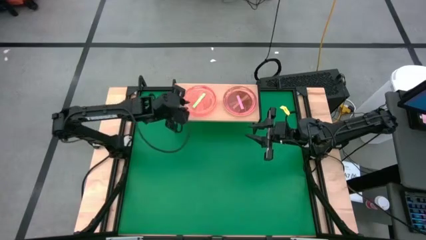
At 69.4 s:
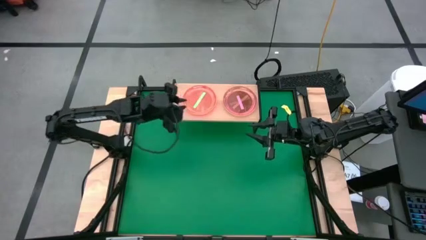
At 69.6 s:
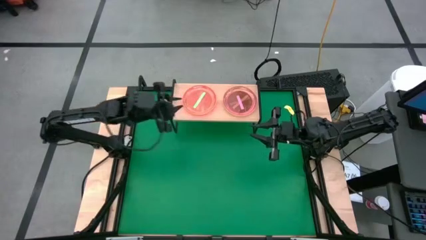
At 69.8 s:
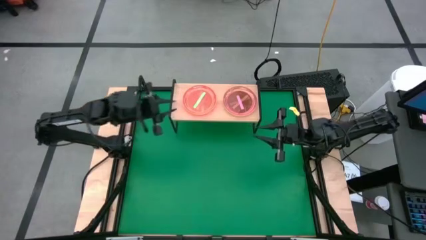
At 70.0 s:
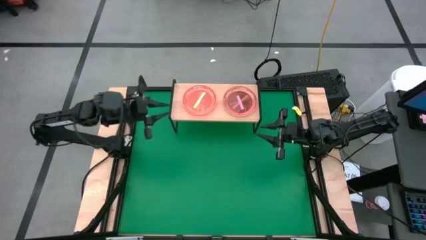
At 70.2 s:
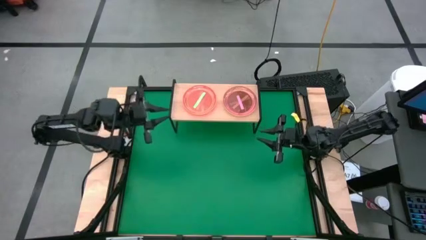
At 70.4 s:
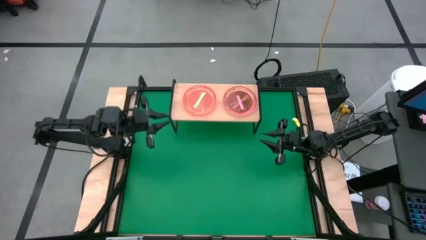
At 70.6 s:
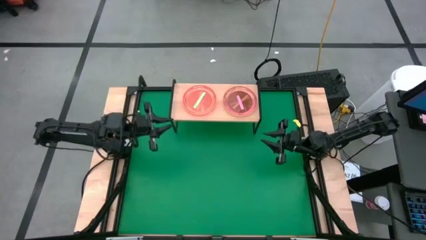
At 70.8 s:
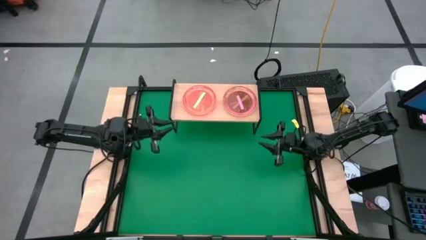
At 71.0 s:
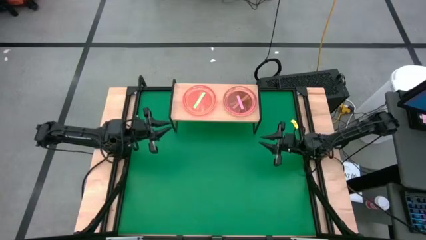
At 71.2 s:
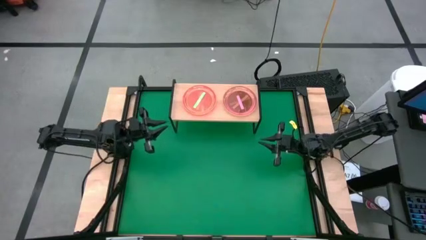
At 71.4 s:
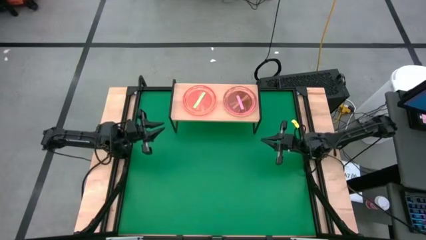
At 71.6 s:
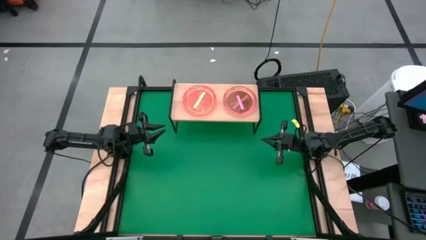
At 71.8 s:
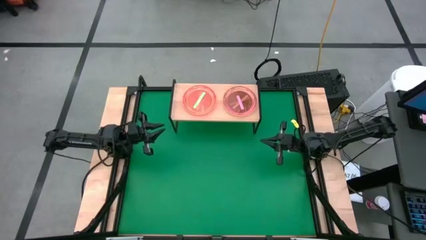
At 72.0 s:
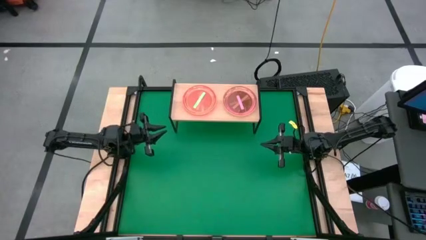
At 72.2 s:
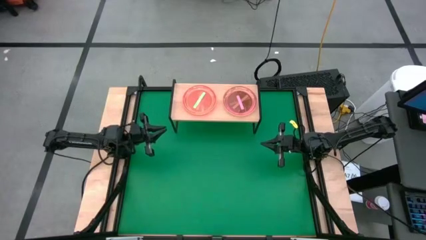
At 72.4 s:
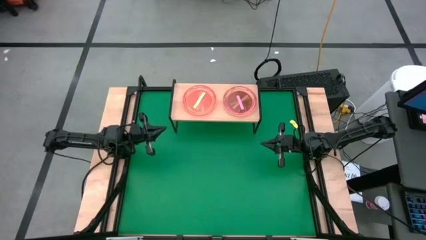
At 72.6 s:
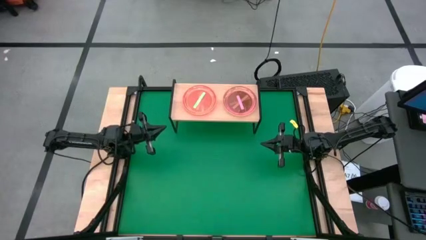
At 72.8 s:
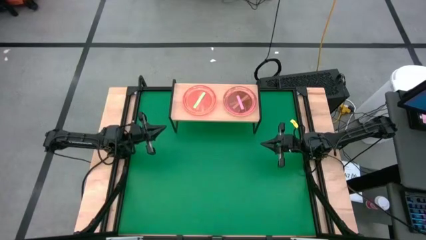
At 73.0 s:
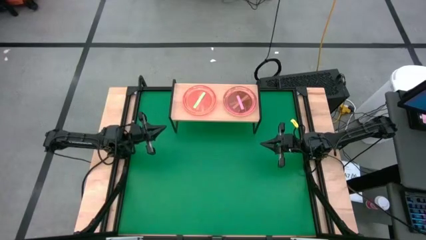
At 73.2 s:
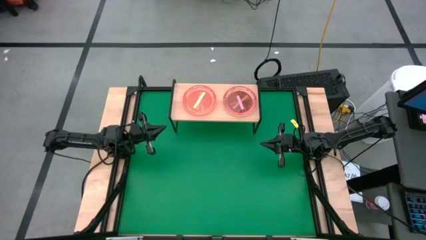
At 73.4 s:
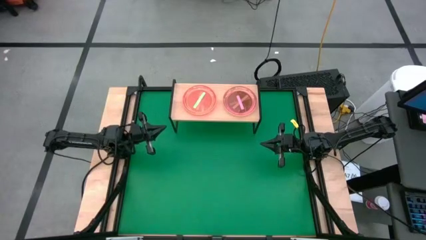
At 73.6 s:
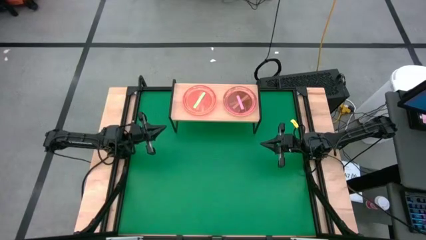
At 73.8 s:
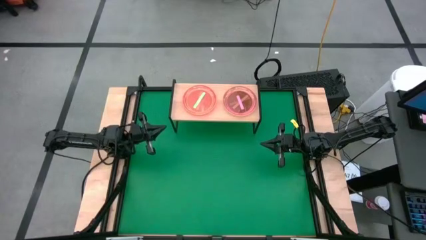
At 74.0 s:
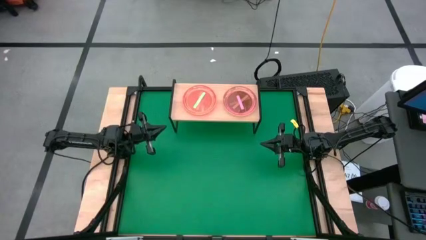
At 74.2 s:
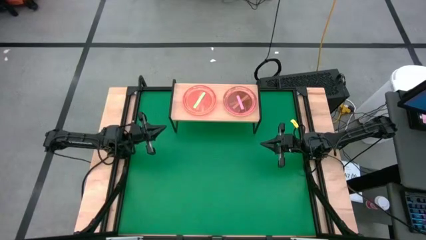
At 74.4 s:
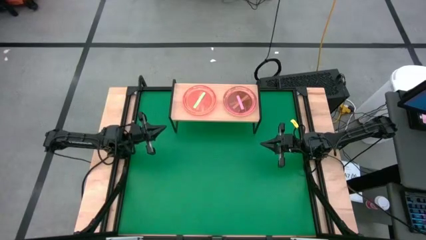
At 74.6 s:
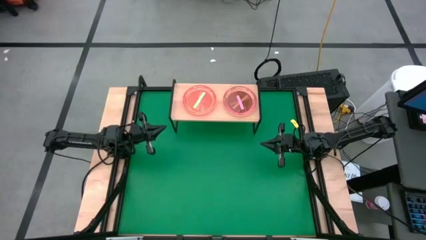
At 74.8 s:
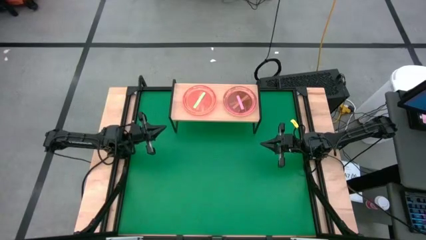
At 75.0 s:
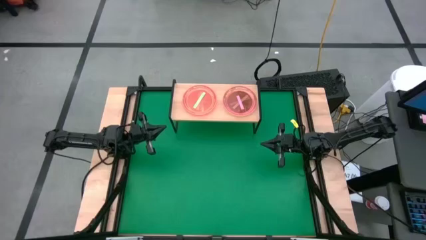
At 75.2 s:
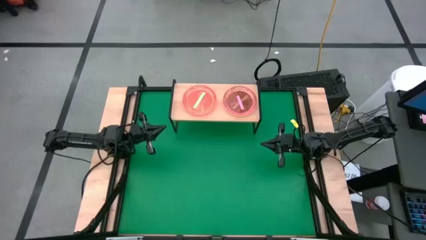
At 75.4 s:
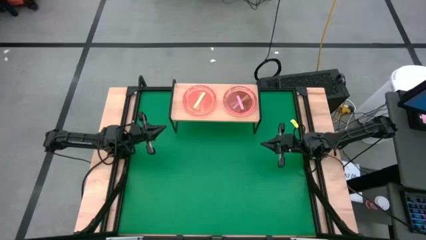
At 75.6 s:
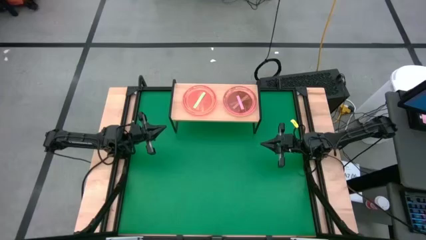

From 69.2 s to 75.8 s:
Task: Place and stack plates onto a shelf
Return to Home Position

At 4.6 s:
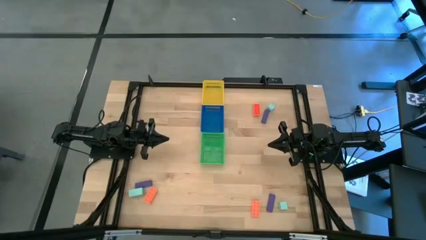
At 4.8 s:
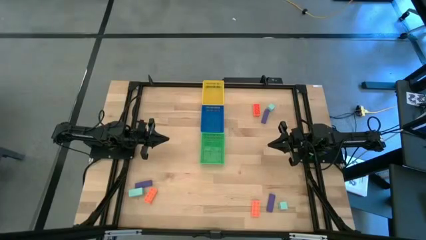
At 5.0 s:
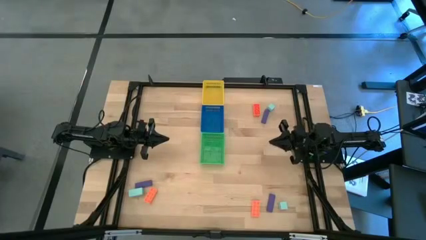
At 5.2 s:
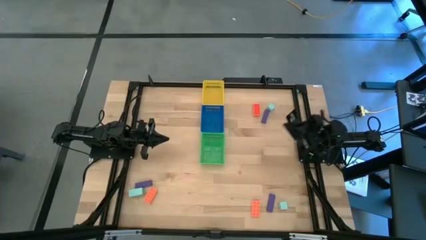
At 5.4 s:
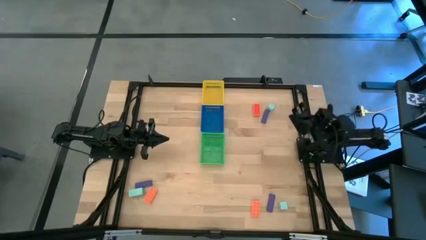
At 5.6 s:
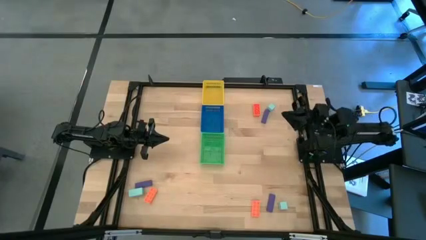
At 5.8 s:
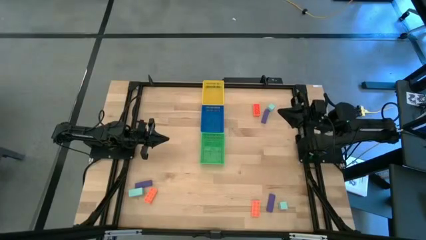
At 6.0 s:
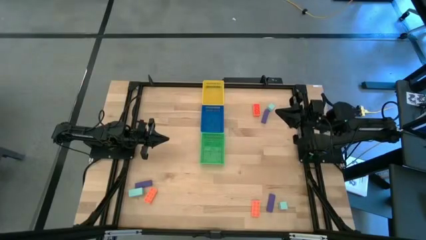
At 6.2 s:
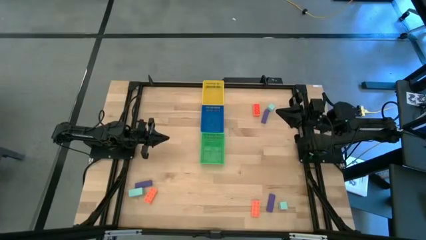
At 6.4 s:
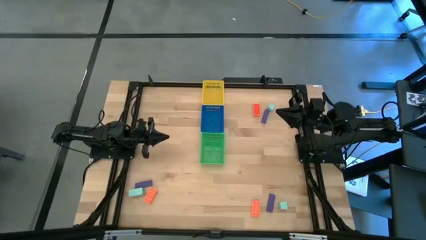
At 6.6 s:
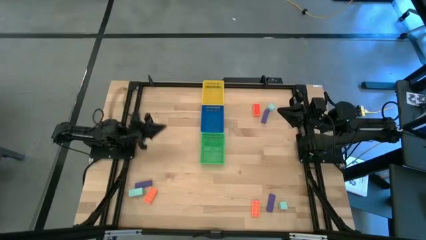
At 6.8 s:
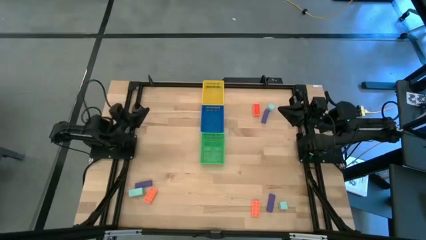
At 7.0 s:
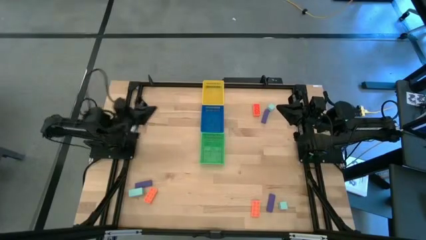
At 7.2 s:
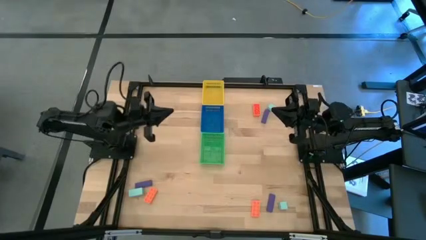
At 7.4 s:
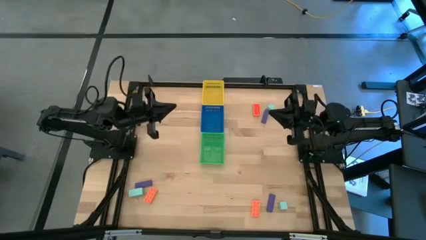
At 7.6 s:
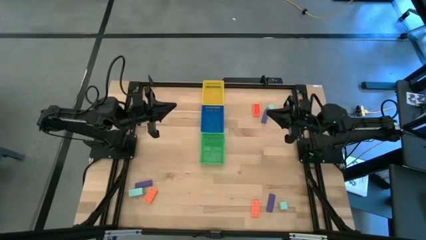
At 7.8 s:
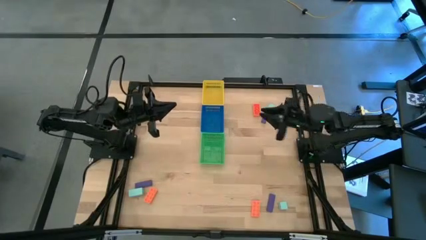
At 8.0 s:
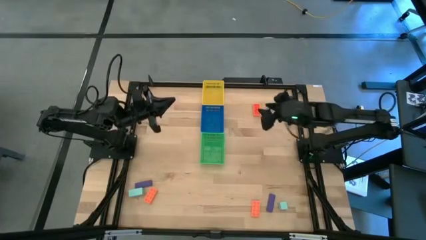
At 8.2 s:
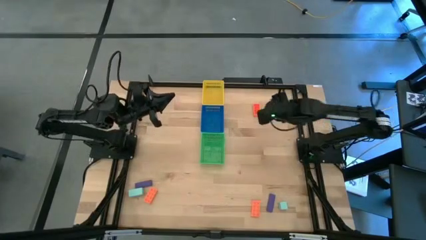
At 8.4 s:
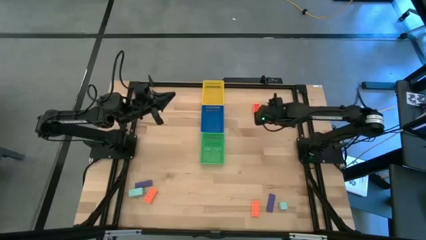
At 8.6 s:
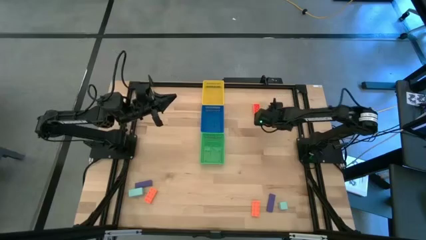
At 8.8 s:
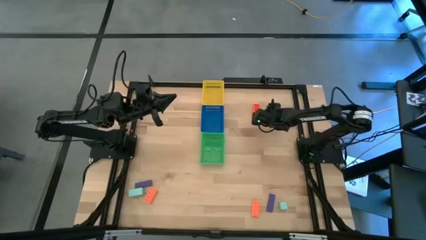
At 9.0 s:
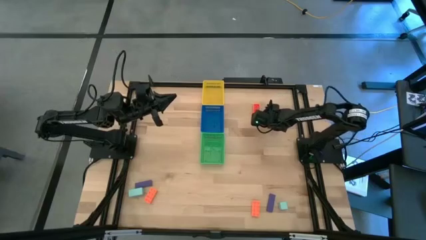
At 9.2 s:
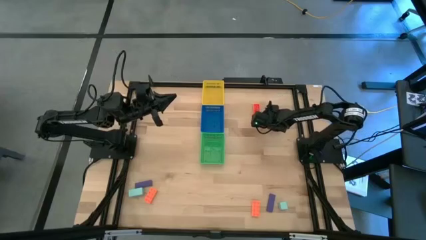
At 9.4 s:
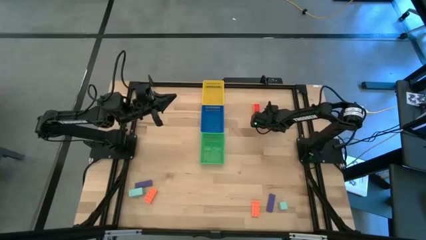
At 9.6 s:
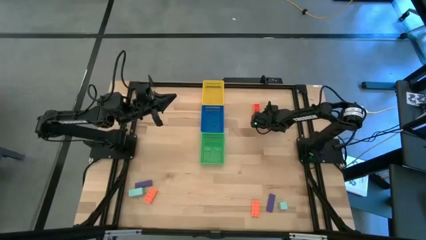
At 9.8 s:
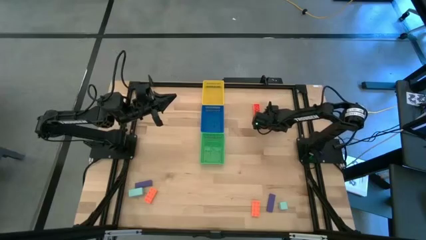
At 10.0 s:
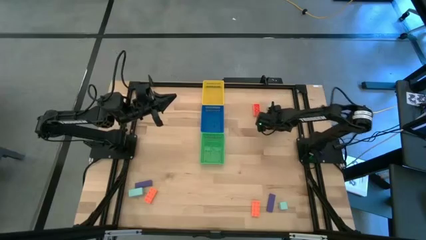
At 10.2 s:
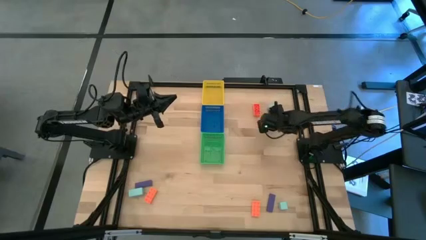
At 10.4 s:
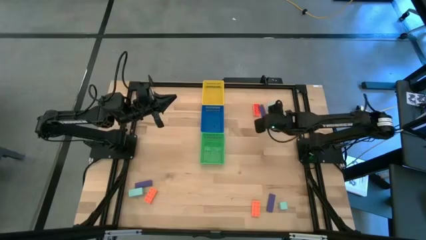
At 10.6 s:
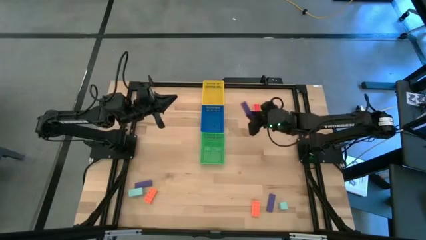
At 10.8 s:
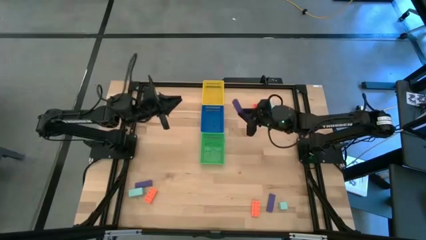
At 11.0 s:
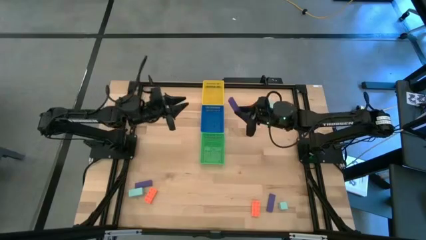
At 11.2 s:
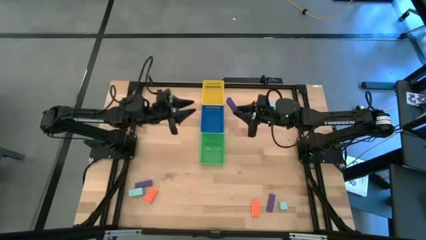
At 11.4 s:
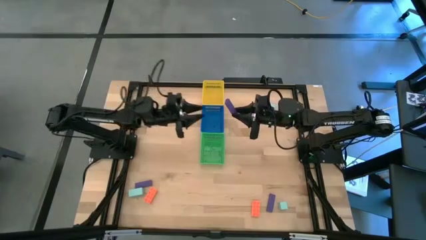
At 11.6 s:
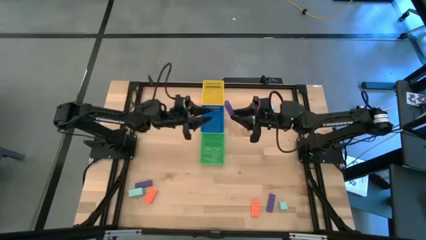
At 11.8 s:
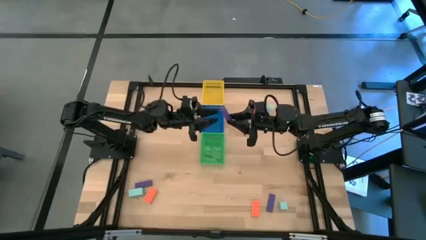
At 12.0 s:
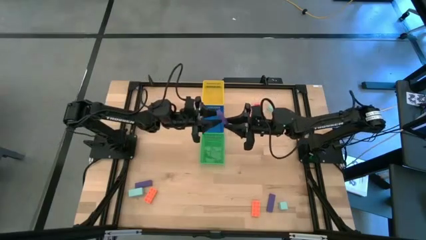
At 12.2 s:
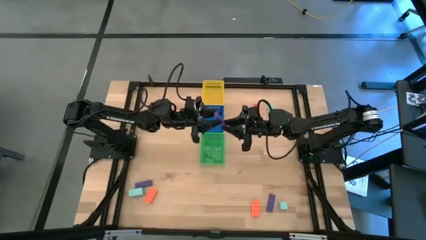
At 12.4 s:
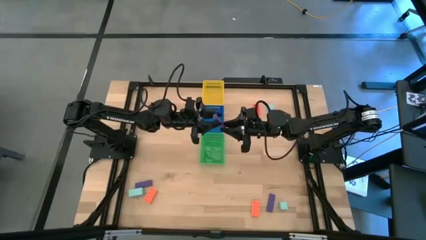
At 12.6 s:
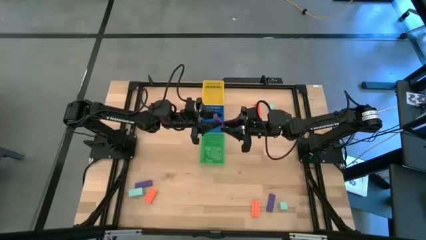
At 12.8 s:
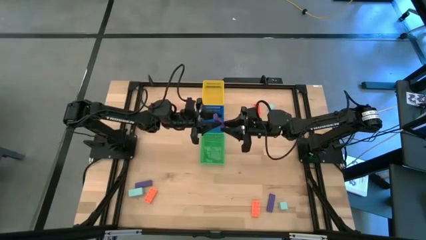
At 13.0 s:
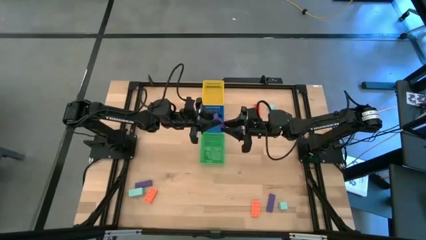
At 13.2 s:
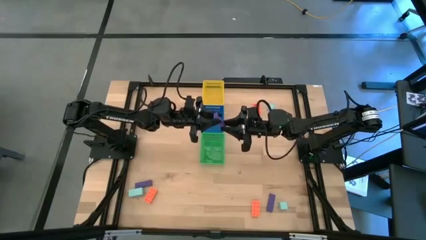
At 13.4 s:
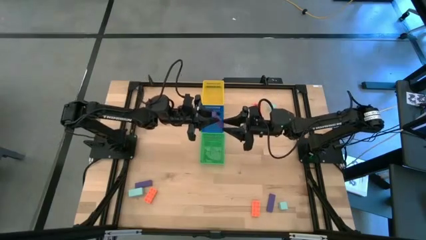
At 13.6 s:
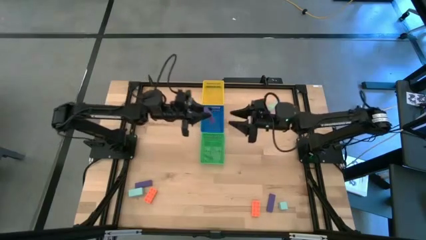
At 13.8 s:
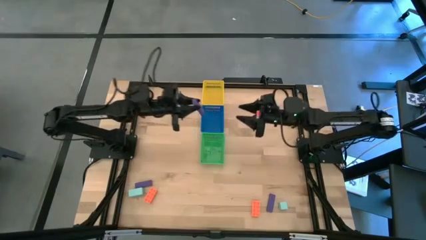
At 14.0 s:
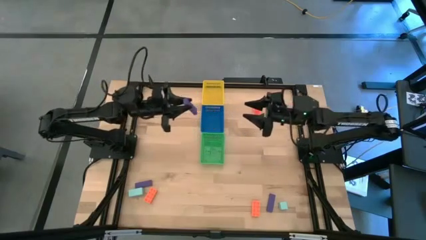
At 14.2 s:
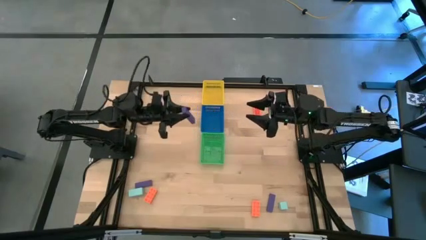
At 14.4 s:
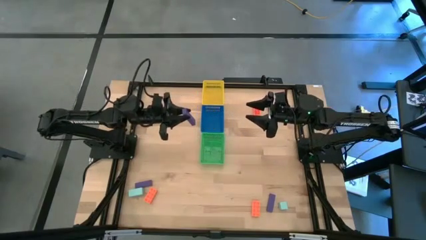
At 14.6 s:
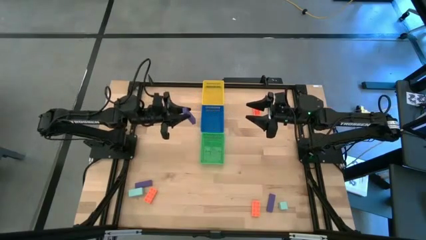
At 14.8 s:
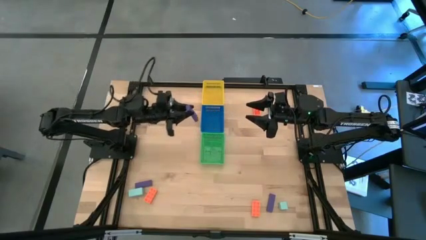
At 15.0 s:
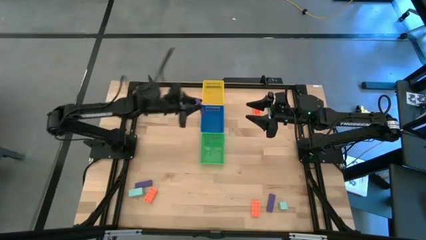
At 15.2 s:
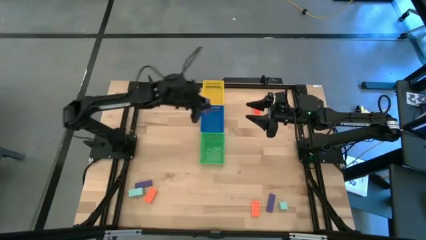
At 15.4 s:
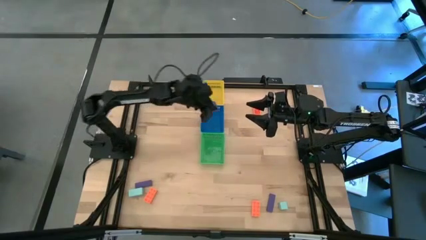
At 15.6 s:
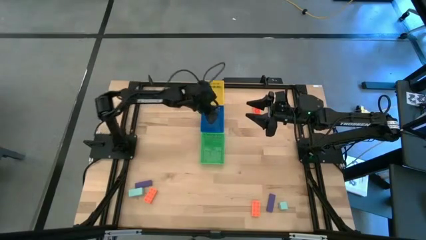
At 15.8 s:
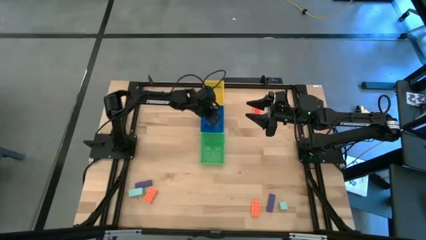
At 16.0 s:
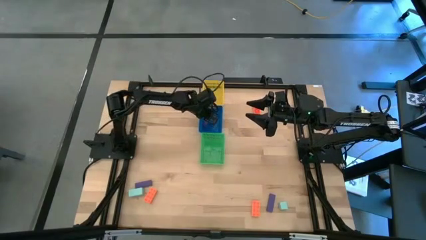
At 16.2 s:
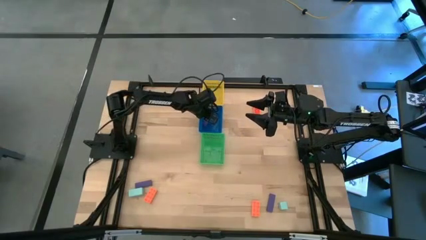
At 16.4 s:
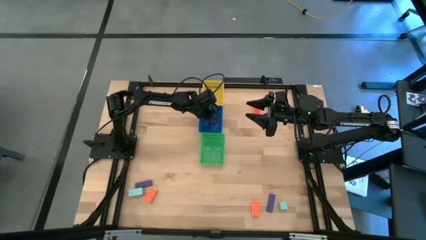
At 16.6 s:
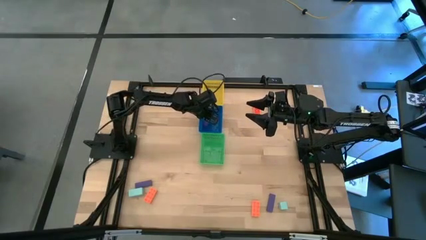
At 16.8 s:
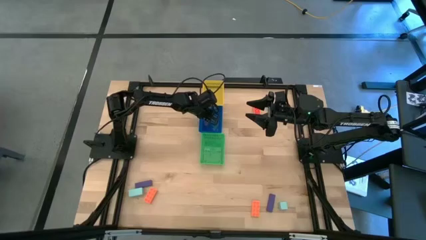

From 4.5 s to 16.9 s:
Task: Sort & place blocks by color
Put the top violet block into the blue basket
